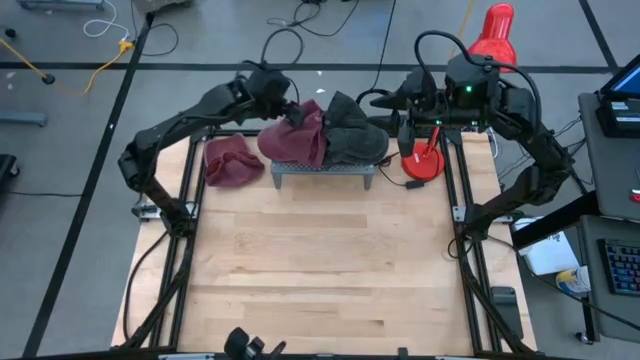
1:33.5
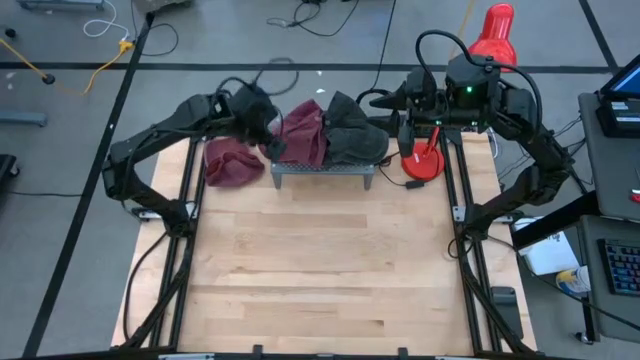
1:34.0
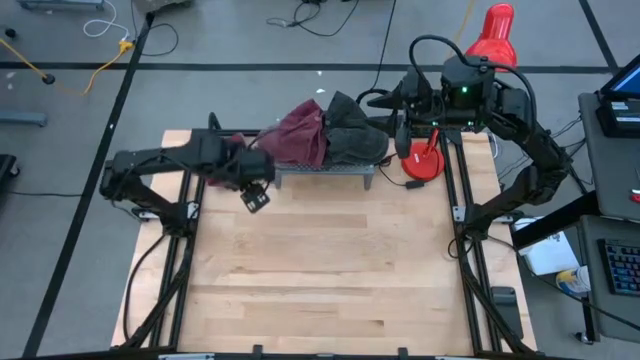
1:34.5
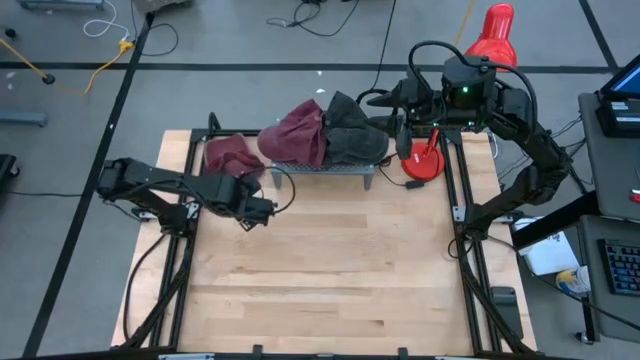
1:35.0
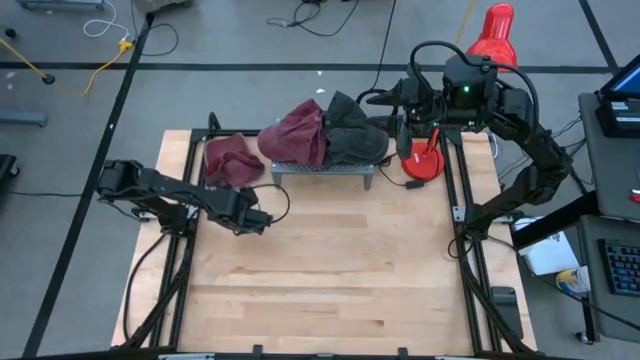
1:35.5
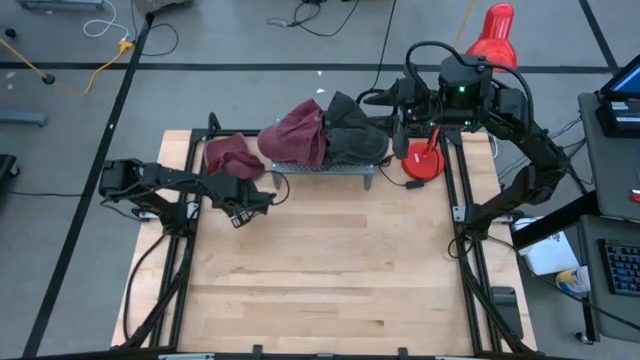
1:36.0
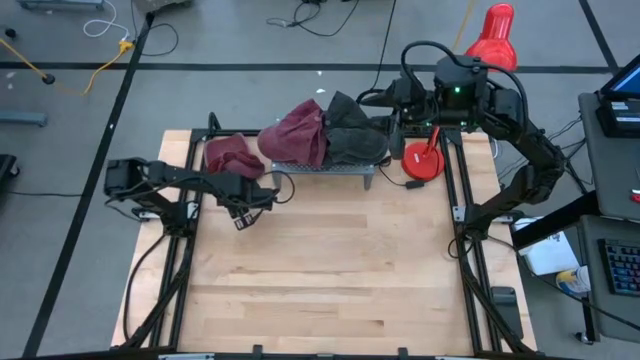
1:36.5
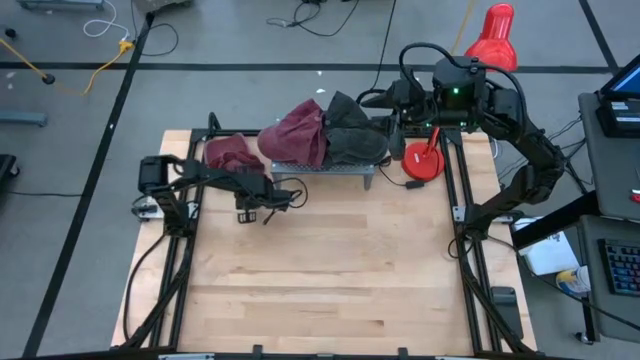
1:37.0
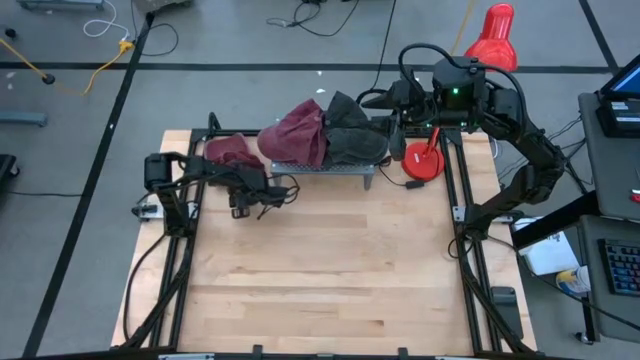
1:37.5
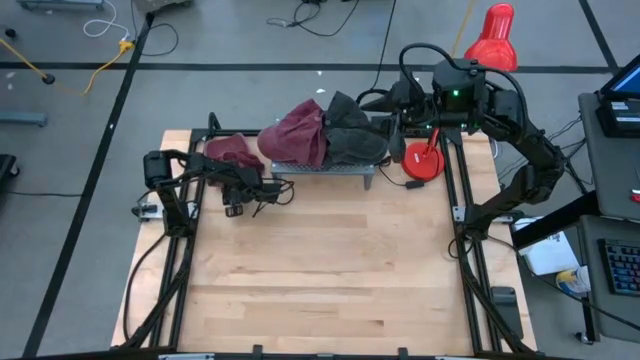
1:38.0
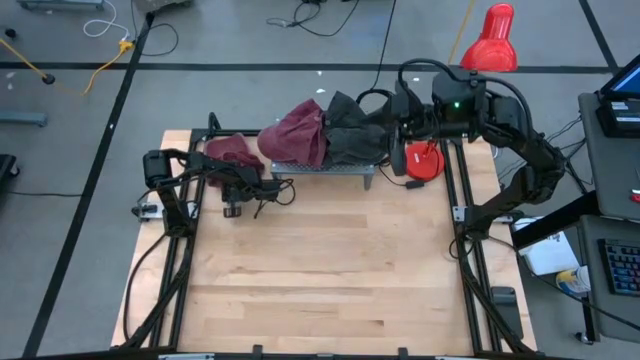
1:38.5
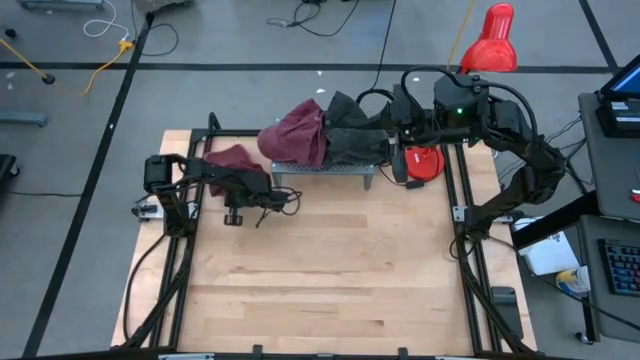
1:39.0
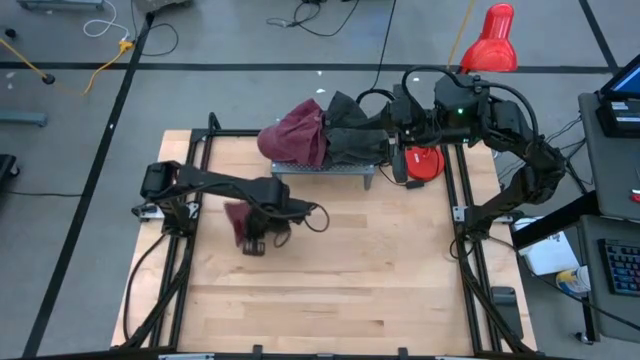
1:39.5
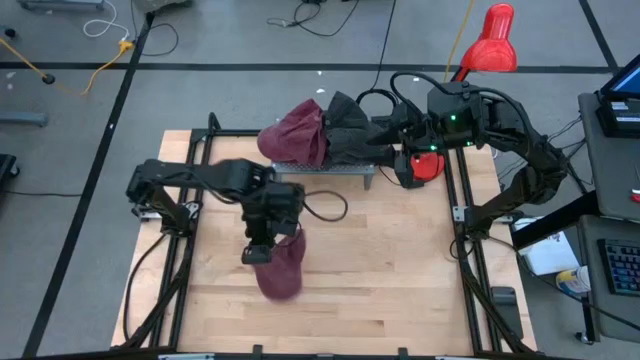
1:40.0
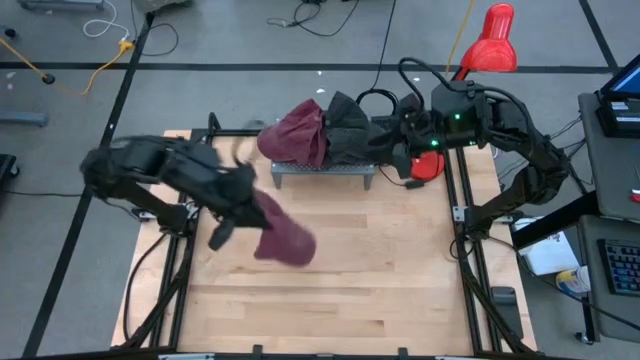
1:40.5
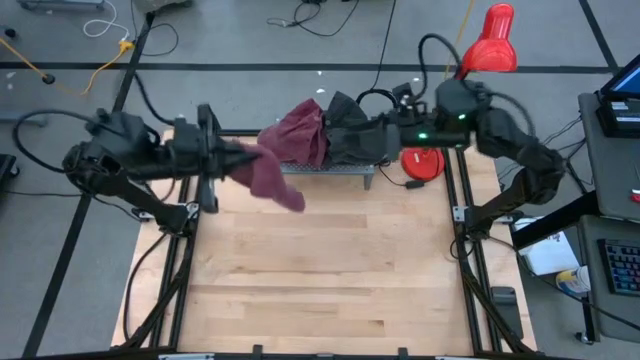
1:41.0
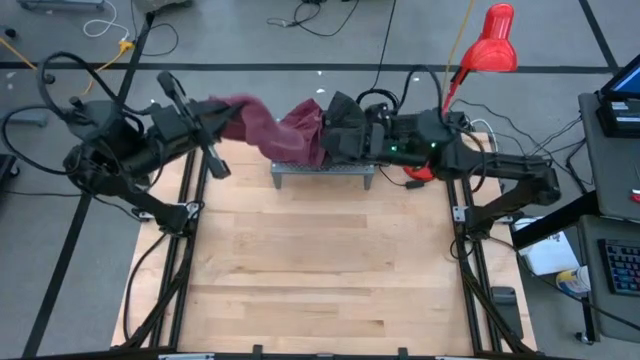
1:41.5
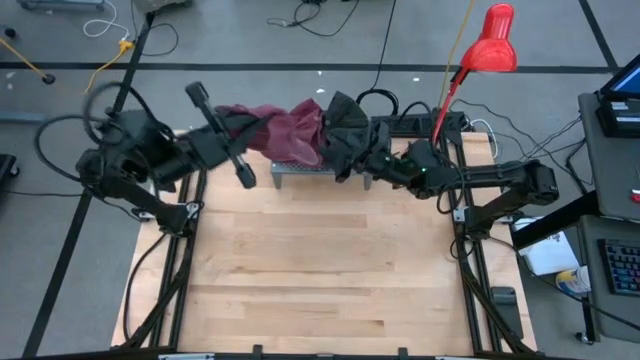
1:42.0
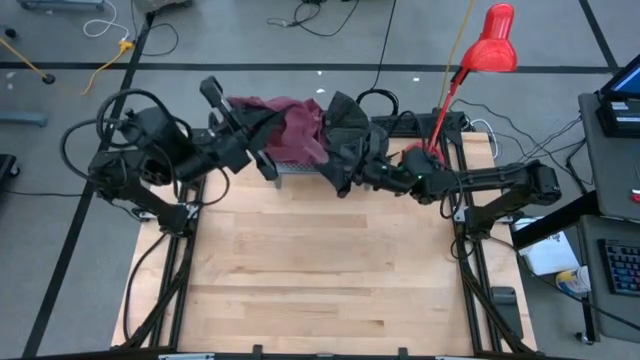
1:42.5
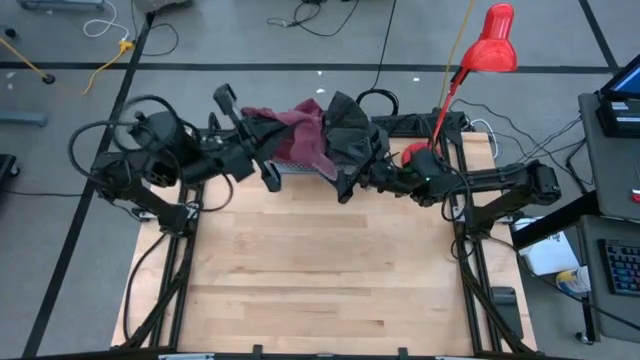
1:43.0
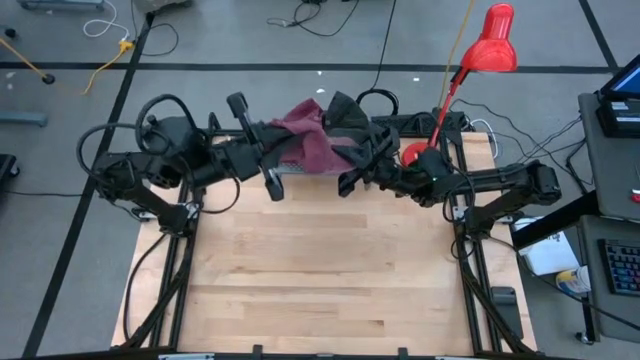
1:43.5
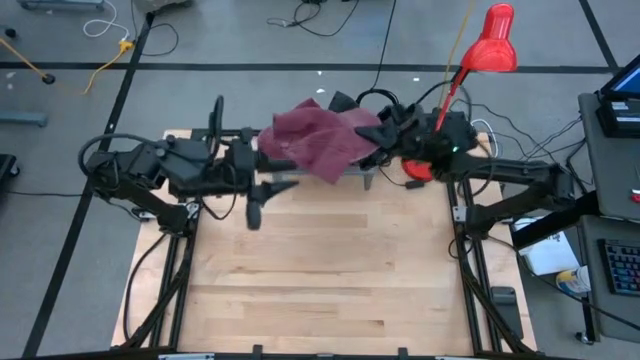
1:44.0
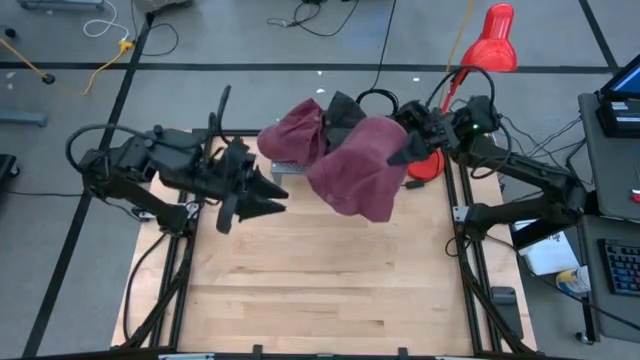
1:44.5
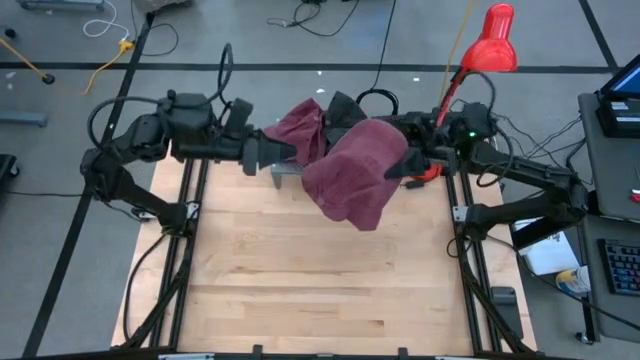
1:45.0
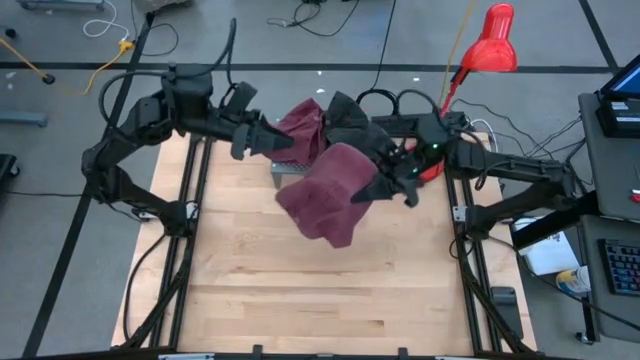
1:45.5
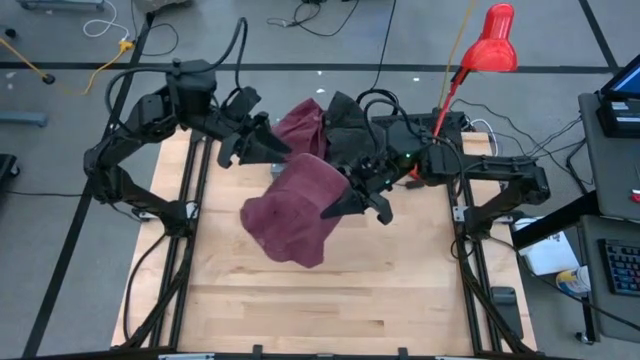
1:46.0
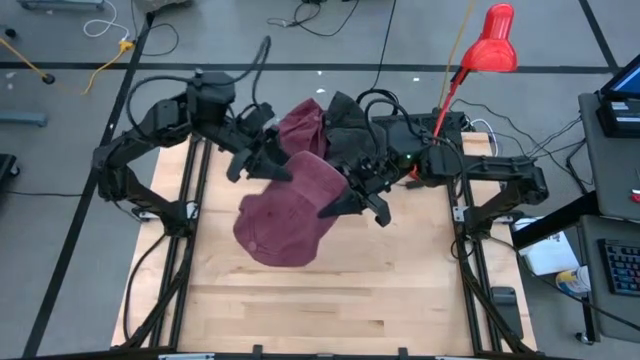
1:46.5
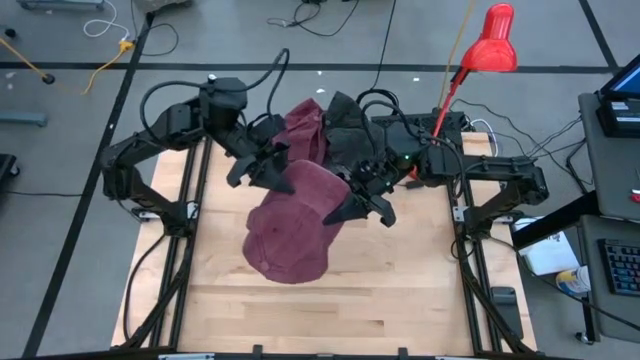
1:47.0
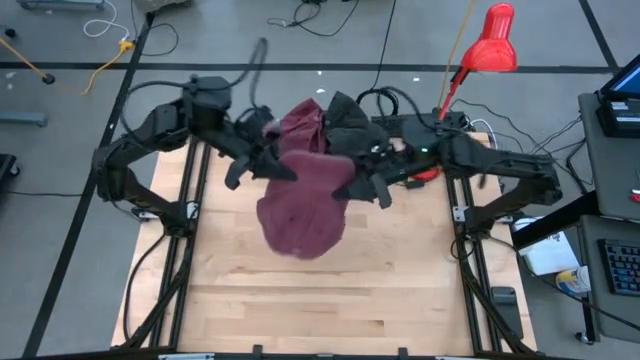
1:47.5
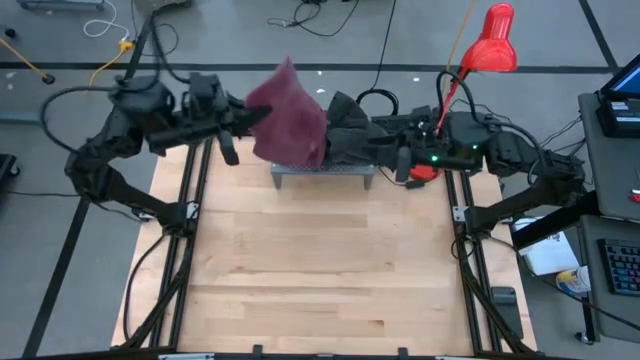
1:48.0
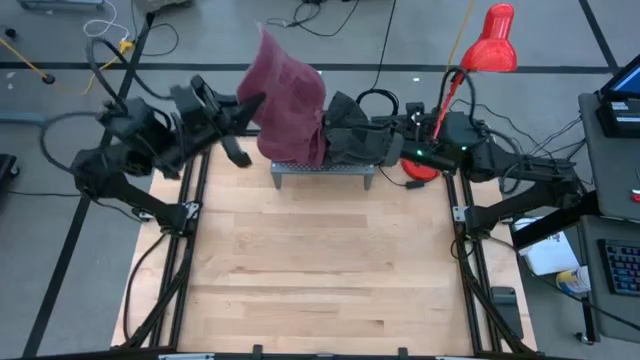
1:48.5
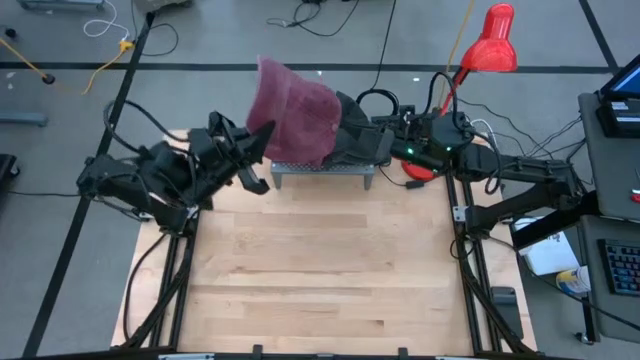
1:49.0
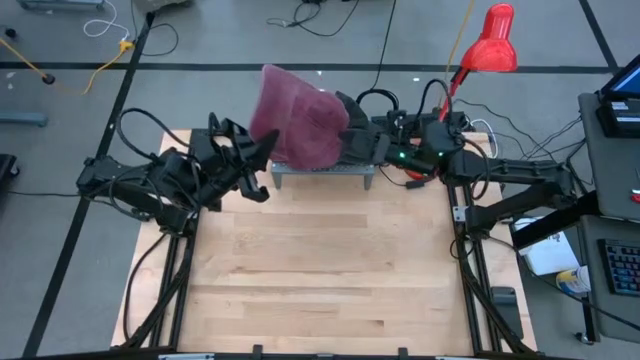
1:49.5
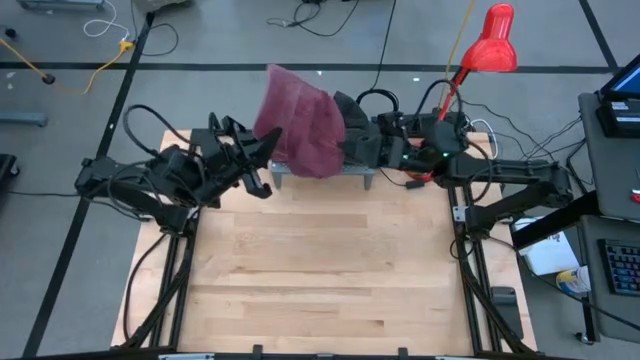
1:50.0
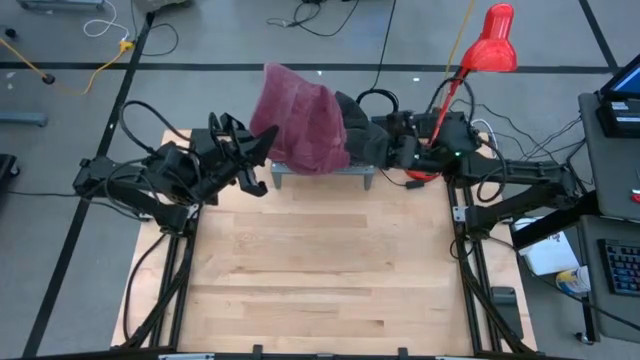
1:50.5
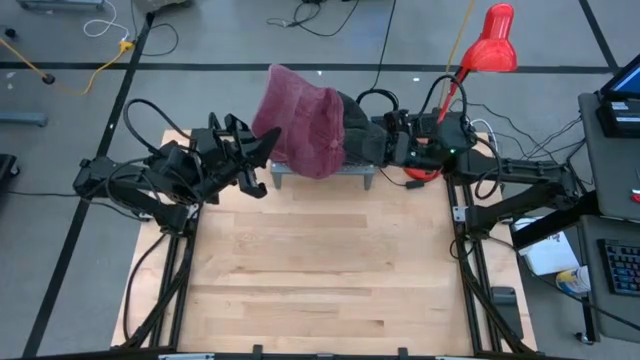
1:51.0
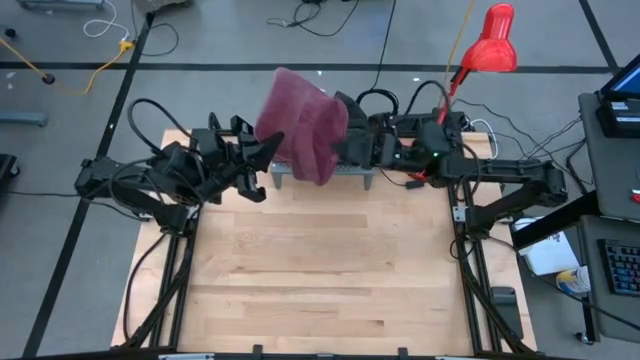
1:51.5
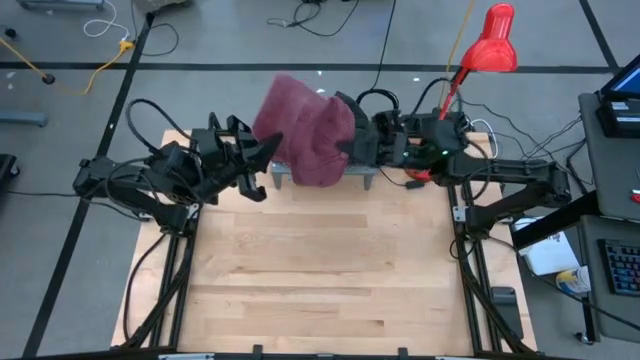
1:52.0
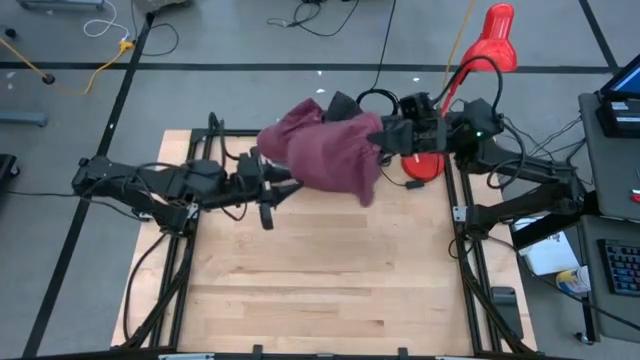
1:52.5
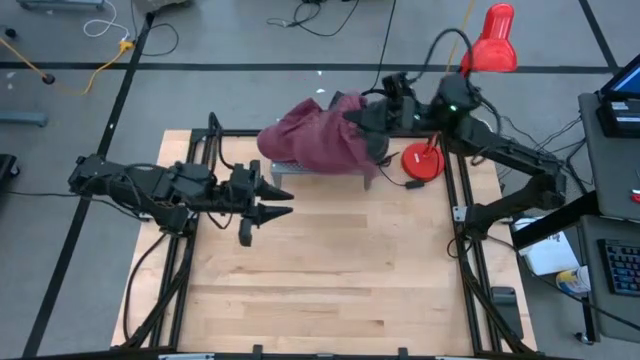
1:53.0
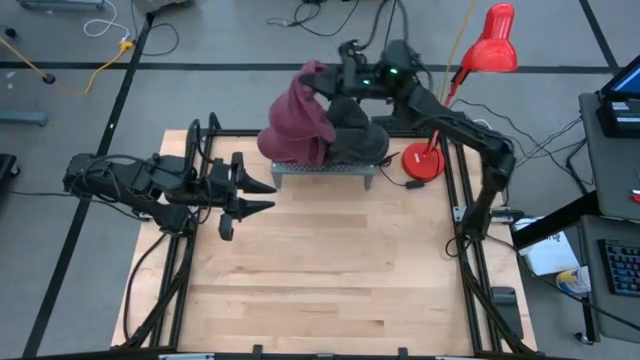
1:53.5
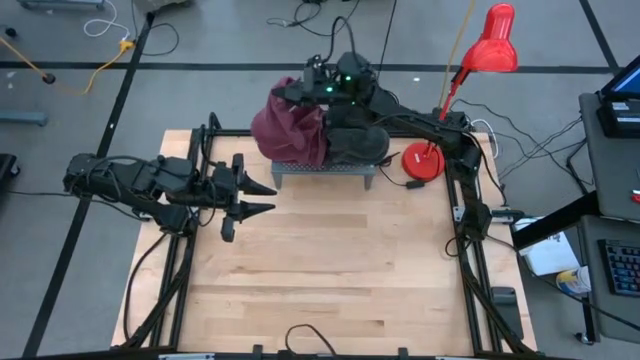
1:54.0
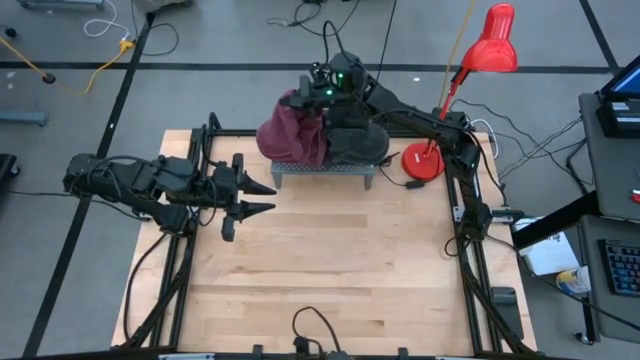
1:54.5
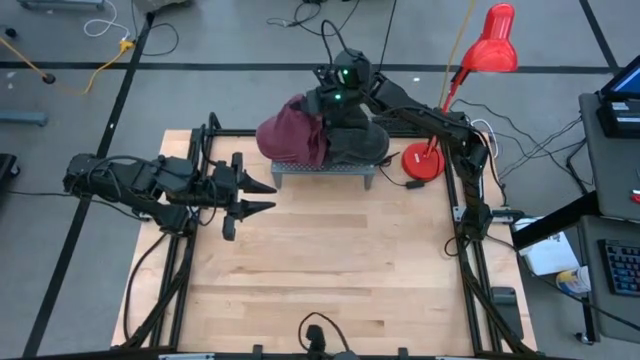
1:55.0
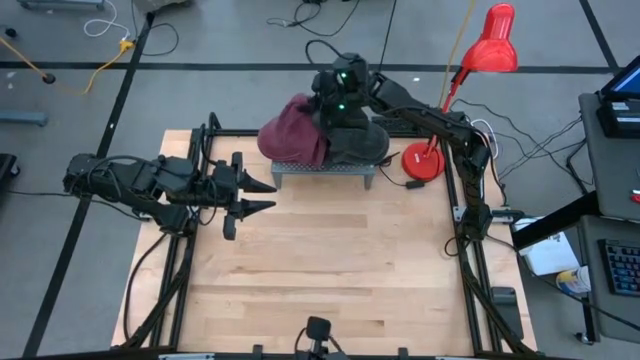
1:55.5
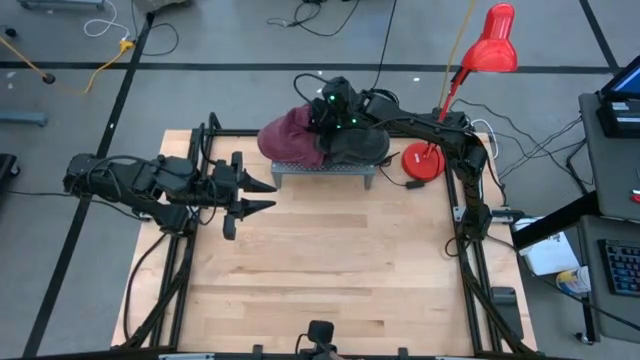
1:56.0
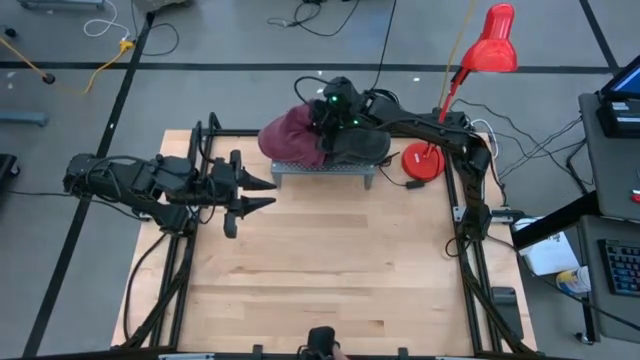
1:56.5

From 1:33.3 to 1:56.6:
Task: Pick & Place hat
Stack the bottom maroon cap on the maroon cap on the shelf
